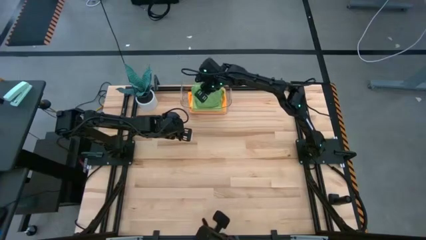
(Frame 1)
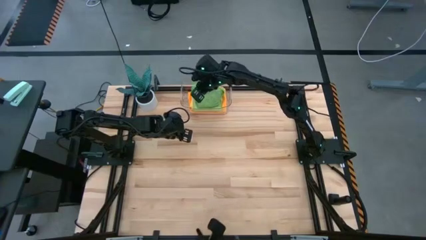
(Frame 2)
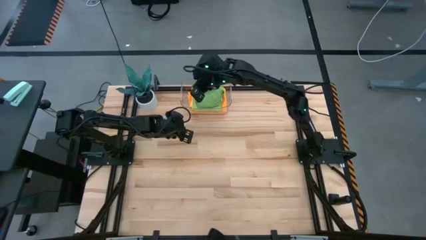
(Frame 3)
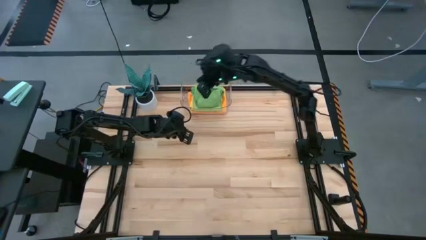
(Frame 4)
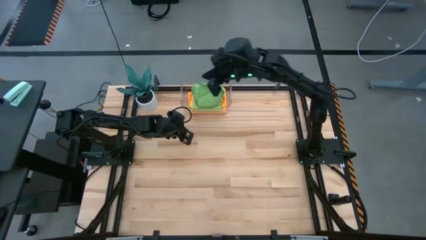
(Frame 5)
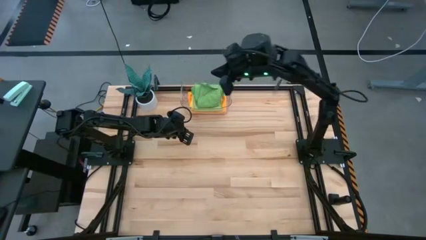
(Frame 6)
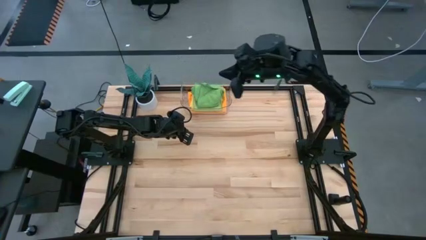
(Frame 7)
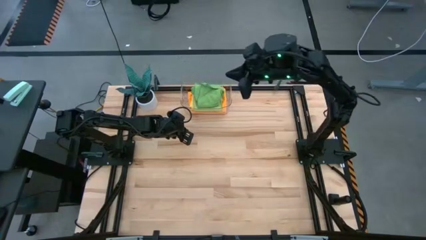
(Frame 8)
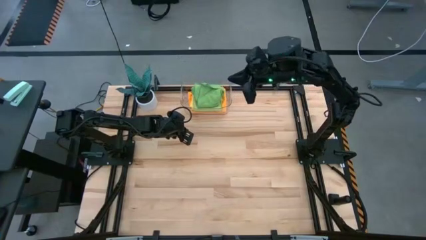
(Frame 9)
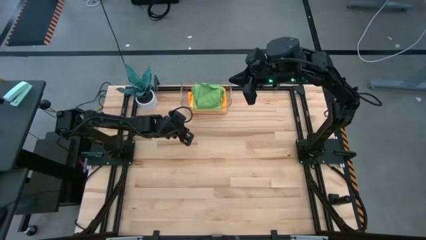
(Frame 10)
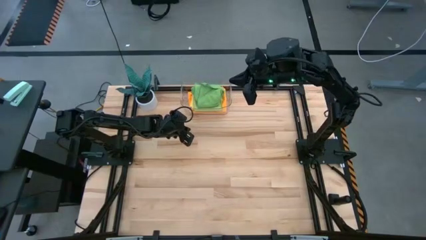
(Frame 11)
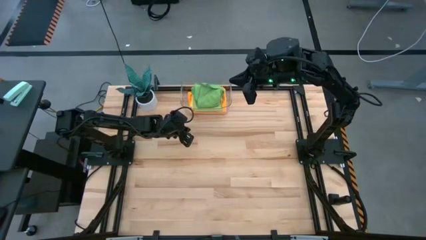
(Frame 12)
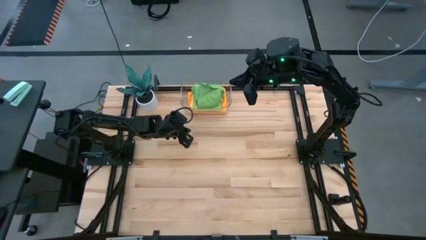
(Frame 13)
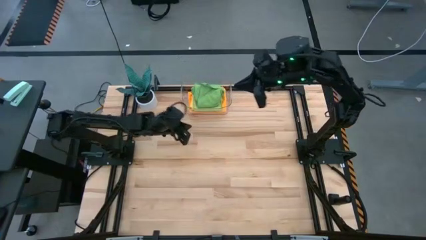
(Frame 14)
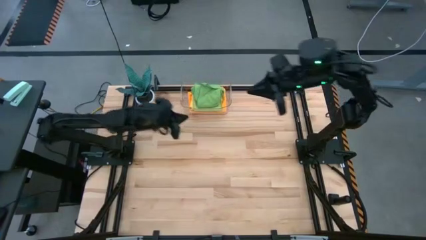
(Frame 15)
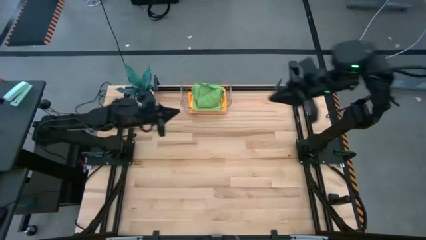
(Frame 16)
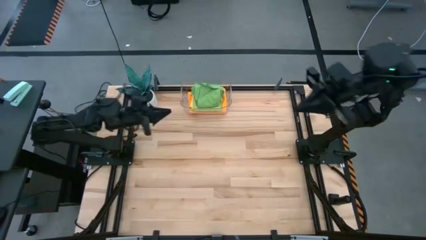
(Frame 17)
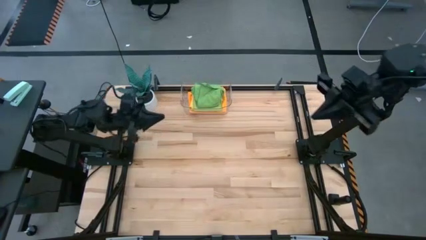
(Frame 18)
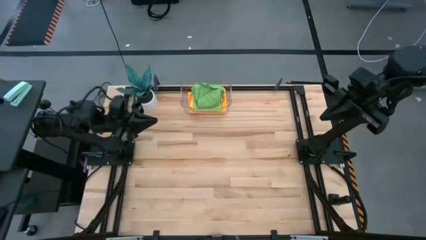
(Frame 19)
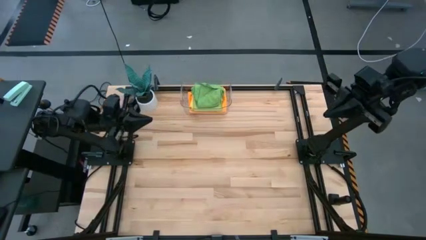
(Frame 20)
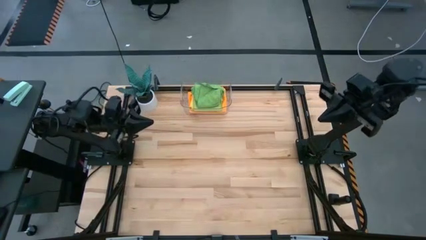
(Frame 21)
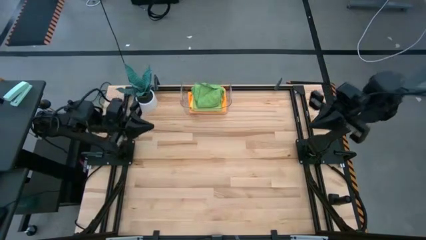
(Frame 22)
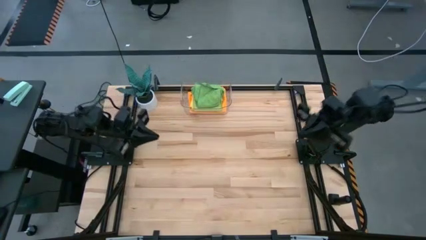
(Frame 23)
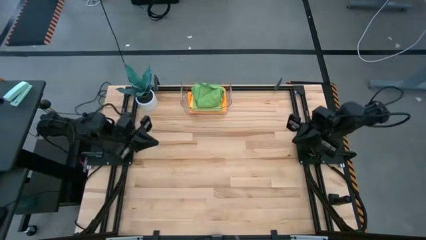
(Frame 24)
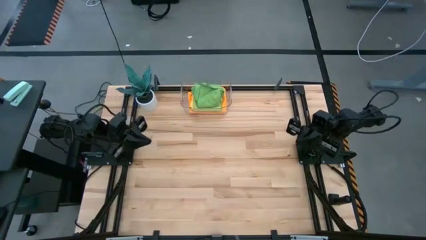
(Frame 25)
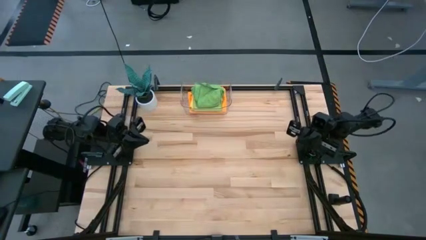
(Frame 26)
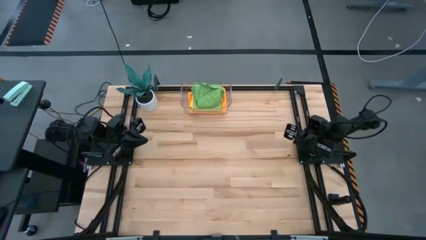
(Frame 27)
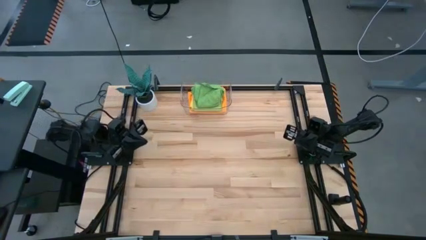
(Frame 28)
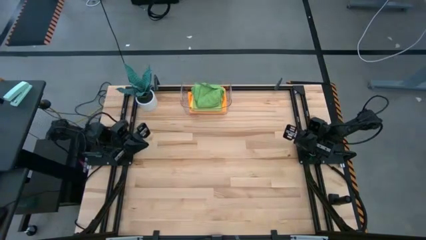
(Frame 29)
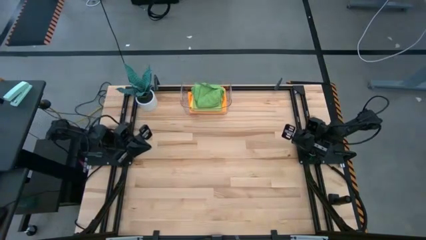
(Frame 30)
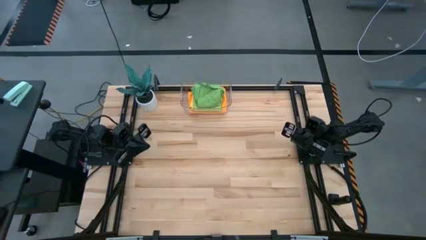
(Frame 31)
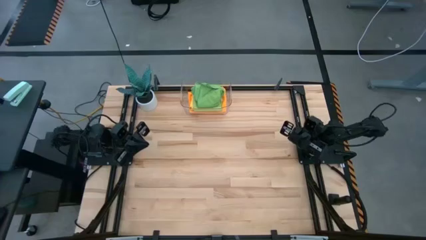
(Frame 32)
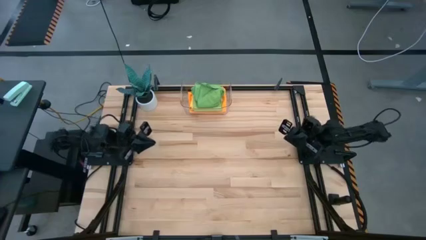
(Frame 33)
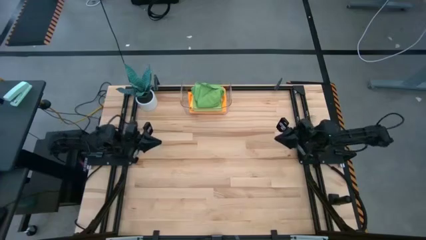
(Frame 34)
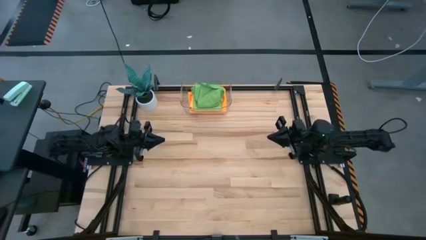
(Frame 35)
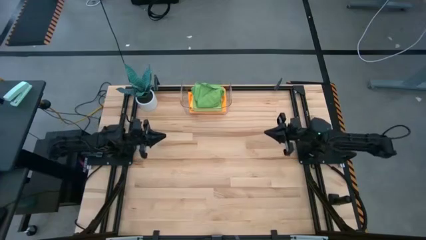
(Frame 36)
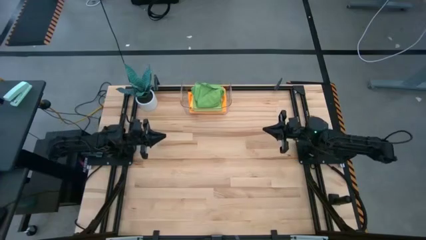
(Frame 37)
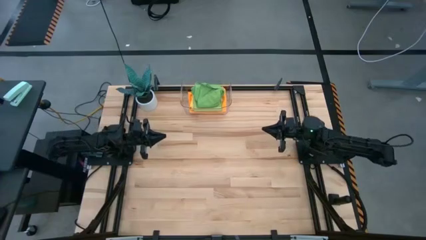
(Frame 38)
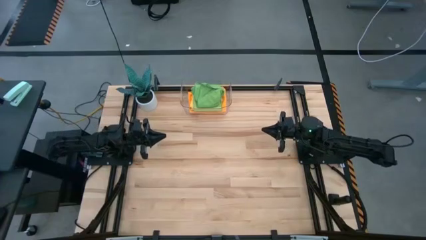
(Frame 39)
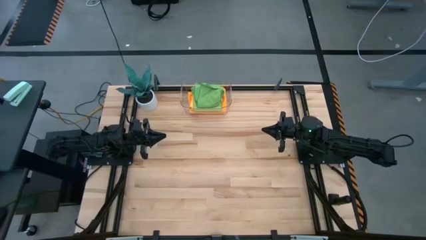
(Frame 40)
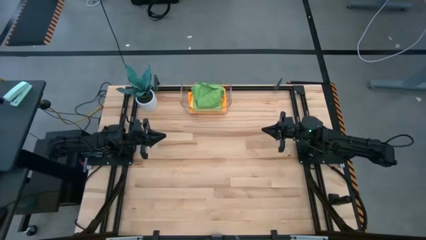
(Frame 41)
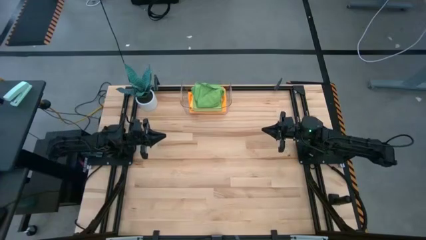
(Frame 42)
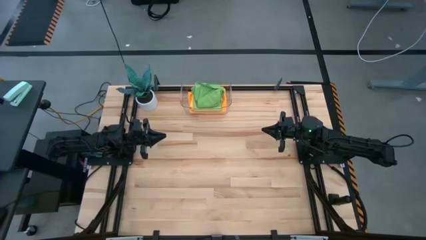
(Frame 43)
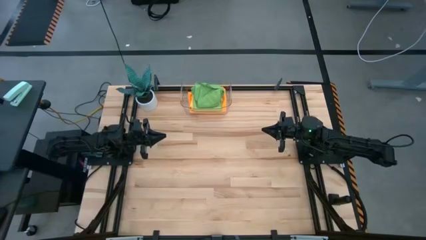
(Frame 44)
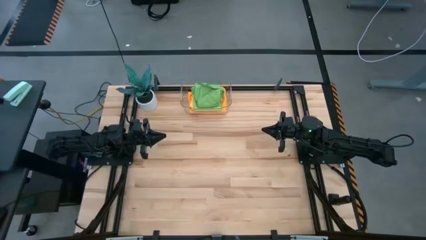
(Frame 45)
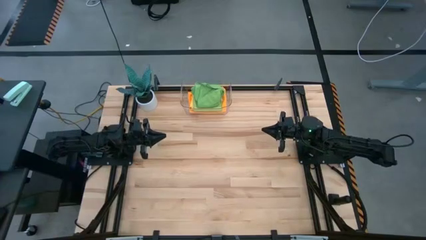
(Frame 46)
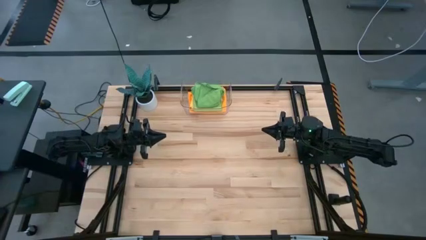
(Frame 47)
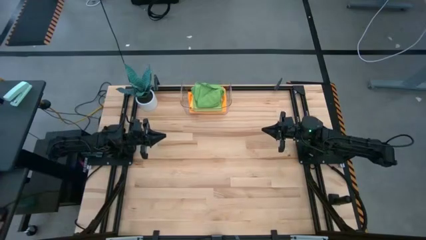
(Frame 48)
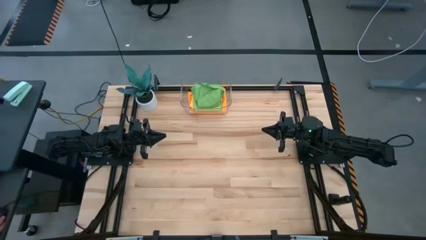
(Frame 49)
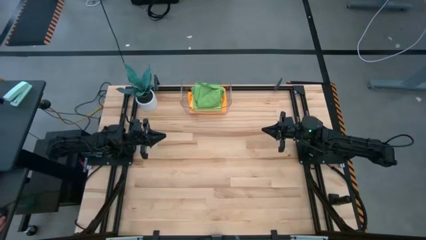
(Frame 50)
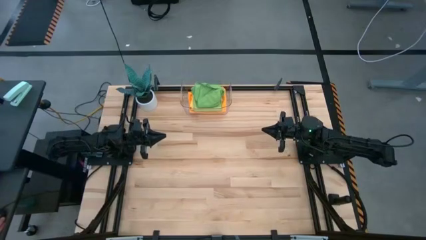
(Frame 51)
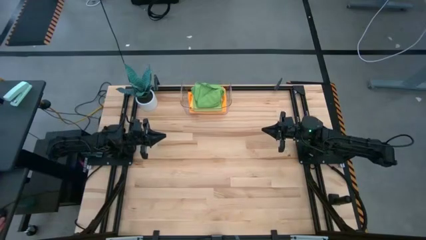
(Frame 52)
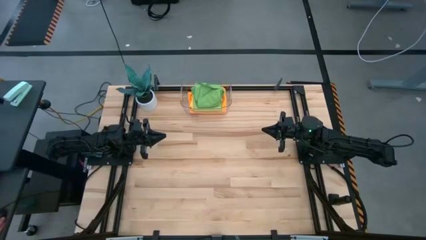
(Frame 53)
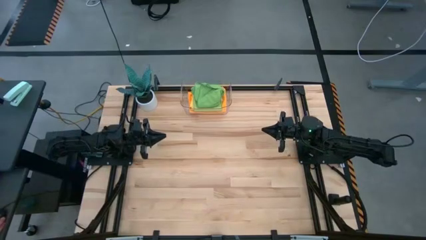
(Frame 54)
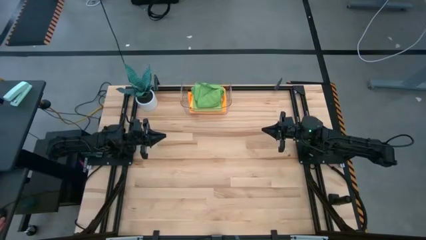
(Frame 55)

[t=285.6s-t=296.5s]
Task: Fold microfiber towels
Return to Home Position
